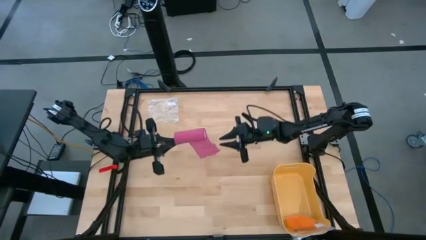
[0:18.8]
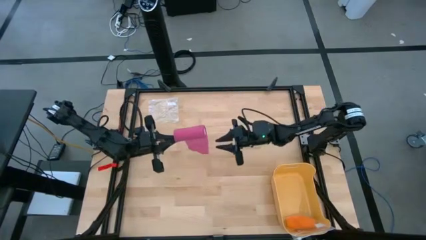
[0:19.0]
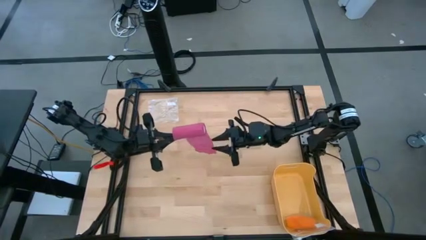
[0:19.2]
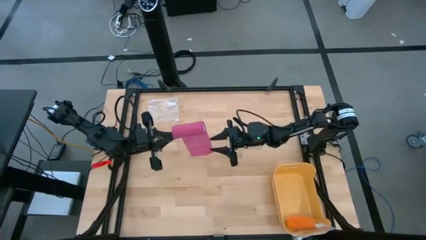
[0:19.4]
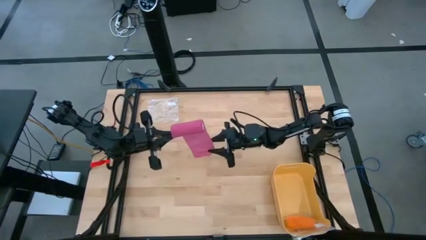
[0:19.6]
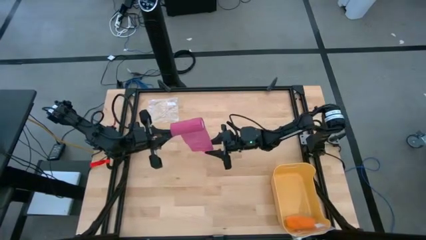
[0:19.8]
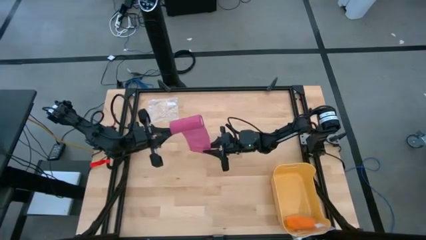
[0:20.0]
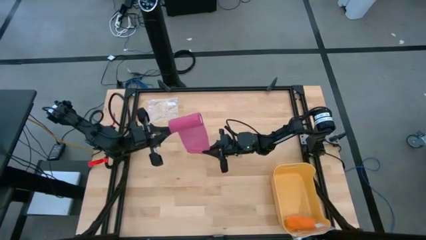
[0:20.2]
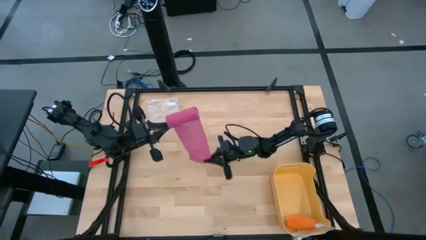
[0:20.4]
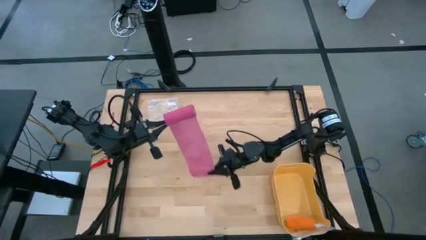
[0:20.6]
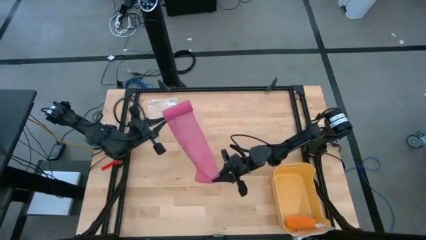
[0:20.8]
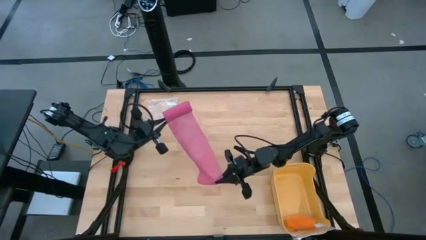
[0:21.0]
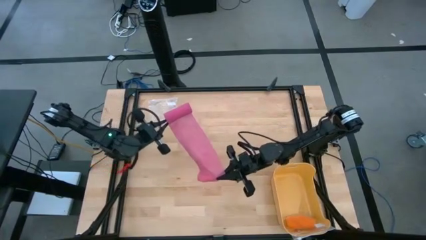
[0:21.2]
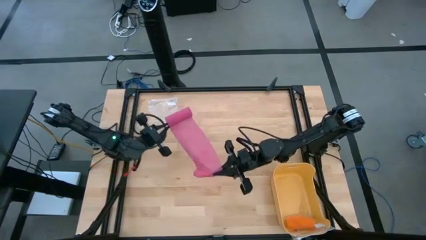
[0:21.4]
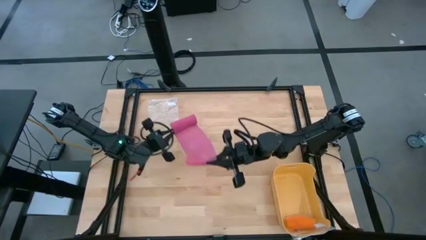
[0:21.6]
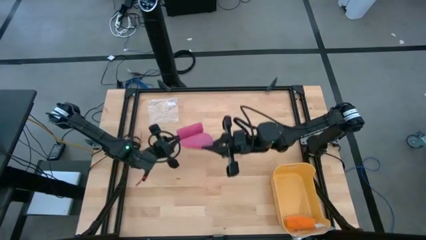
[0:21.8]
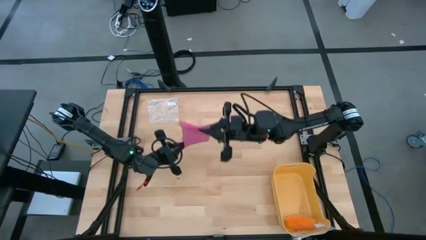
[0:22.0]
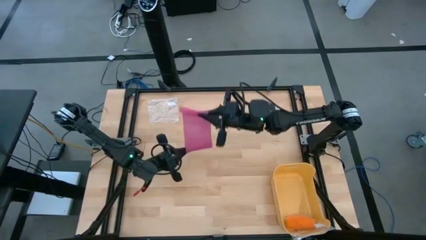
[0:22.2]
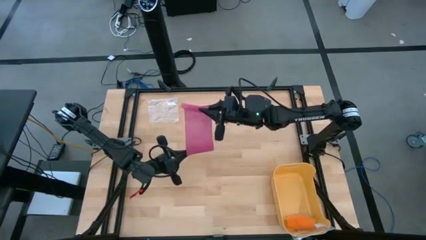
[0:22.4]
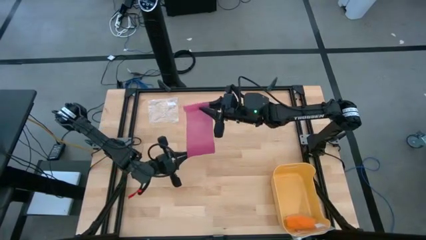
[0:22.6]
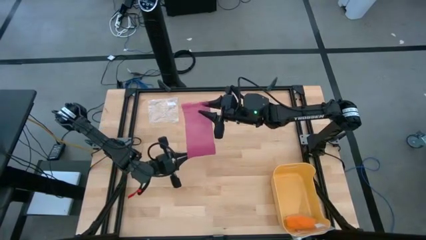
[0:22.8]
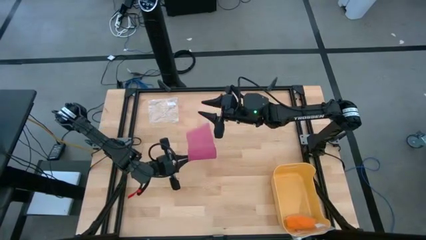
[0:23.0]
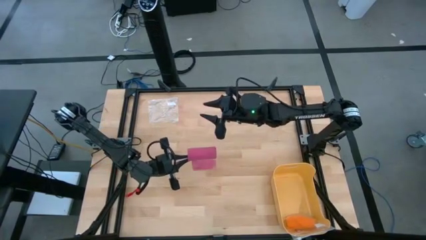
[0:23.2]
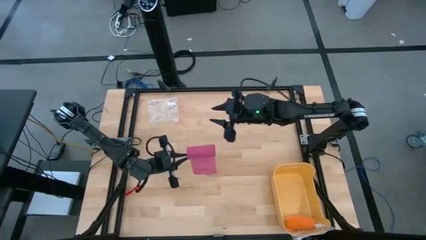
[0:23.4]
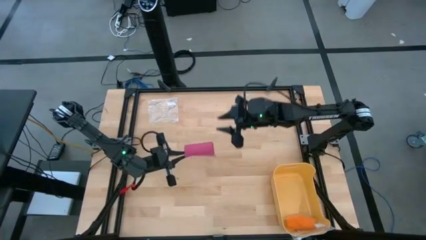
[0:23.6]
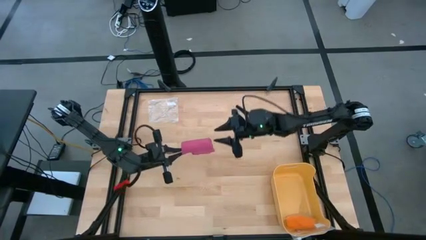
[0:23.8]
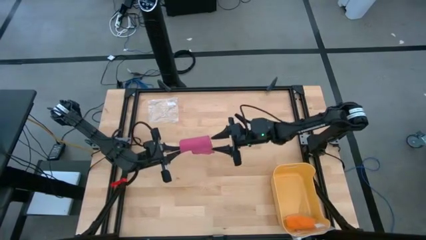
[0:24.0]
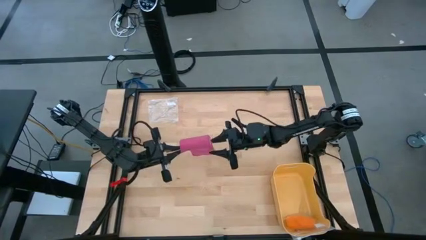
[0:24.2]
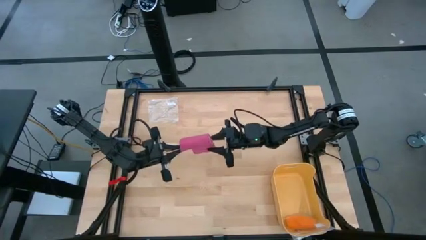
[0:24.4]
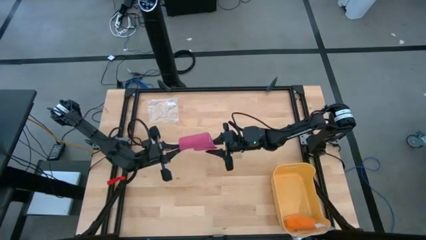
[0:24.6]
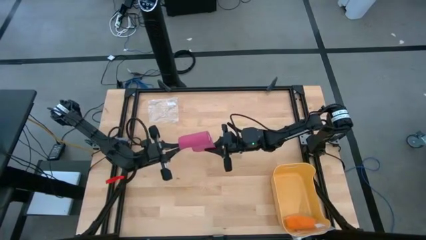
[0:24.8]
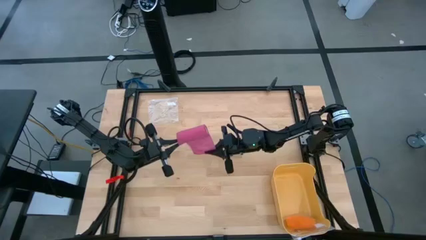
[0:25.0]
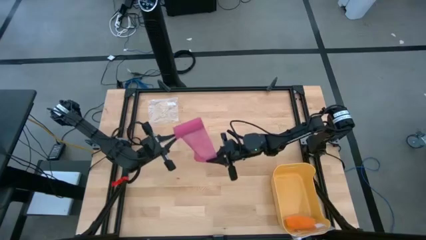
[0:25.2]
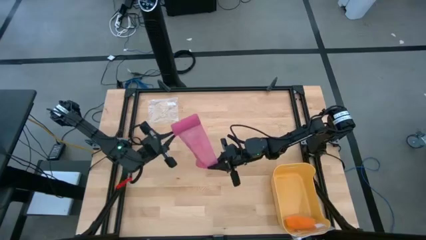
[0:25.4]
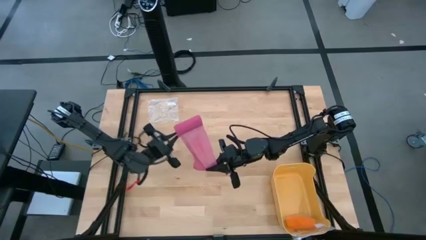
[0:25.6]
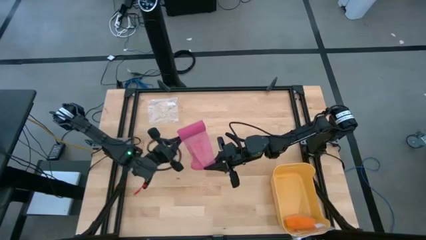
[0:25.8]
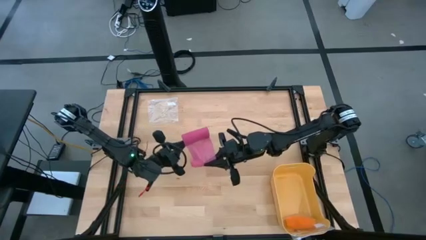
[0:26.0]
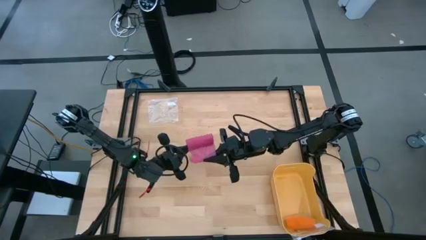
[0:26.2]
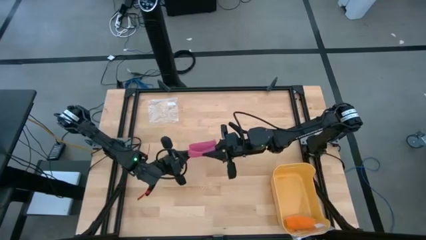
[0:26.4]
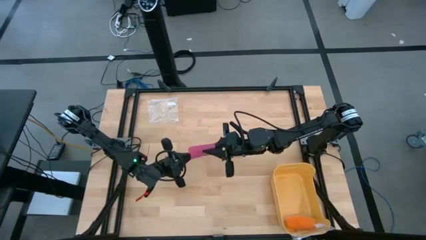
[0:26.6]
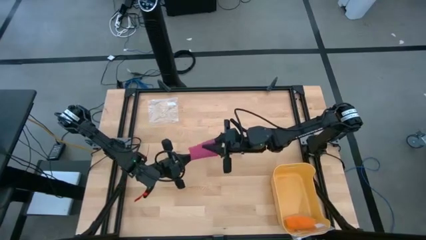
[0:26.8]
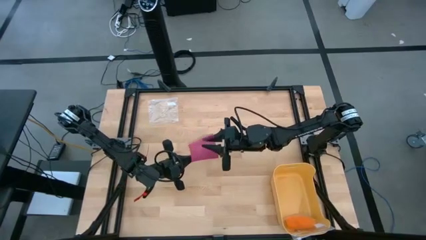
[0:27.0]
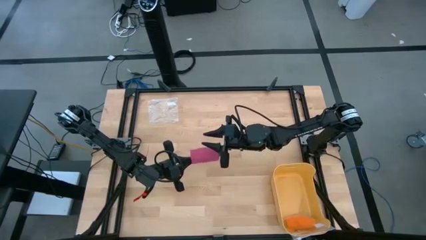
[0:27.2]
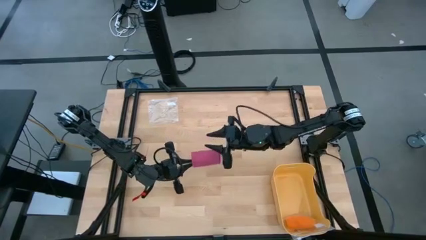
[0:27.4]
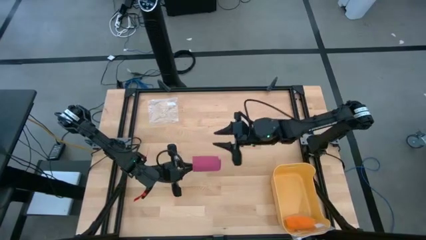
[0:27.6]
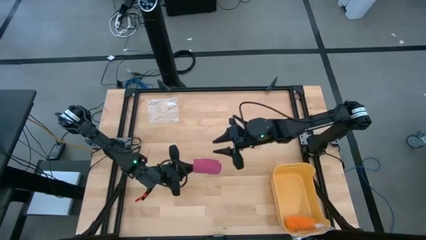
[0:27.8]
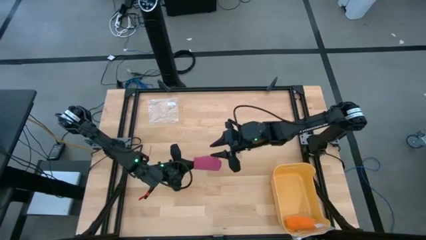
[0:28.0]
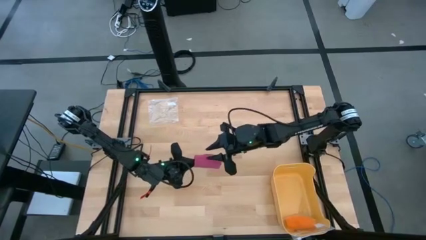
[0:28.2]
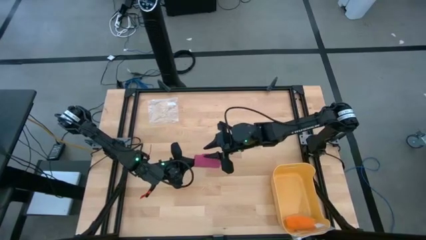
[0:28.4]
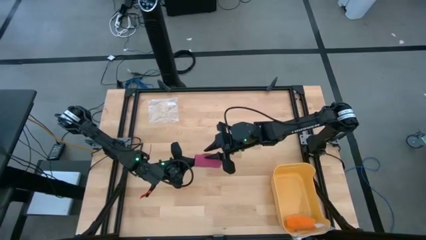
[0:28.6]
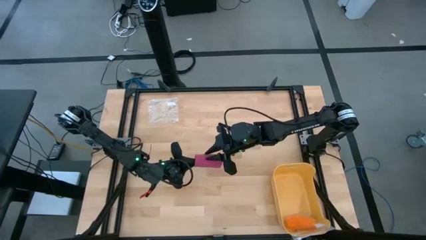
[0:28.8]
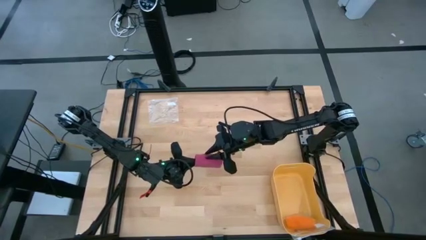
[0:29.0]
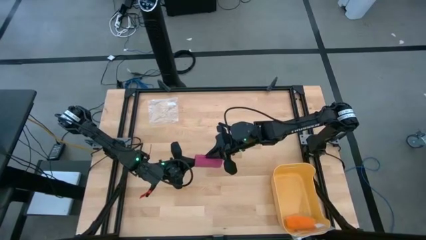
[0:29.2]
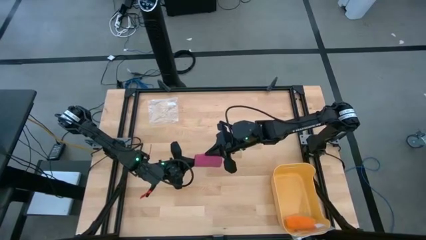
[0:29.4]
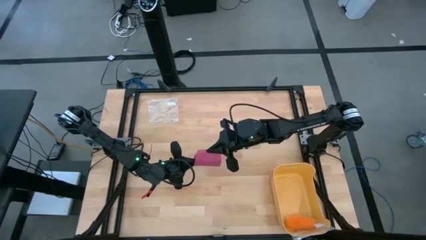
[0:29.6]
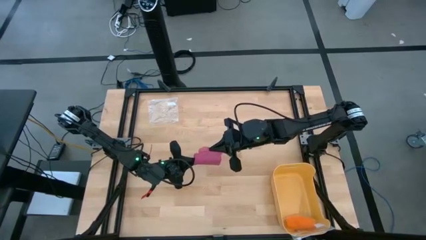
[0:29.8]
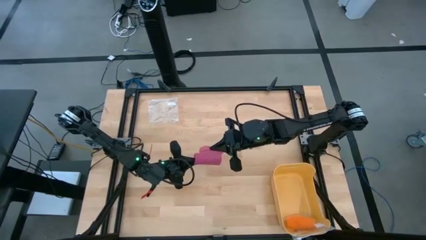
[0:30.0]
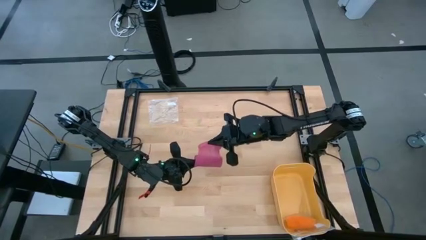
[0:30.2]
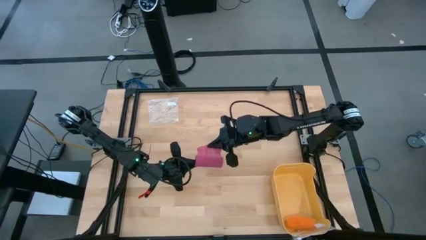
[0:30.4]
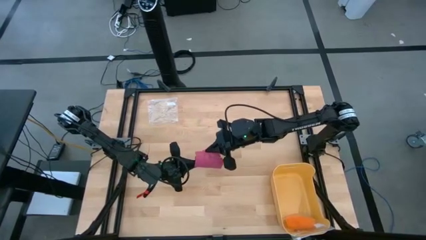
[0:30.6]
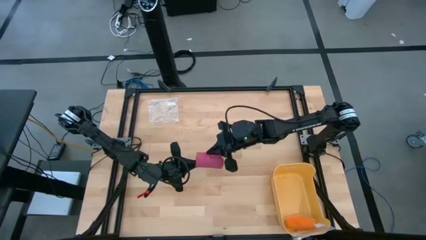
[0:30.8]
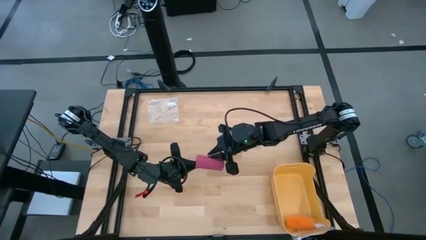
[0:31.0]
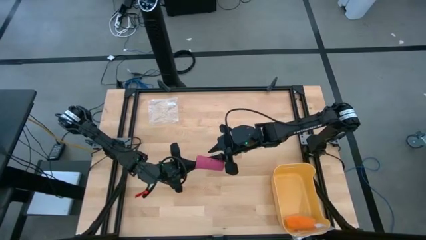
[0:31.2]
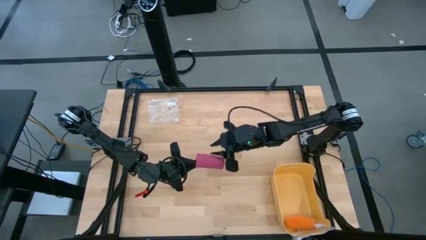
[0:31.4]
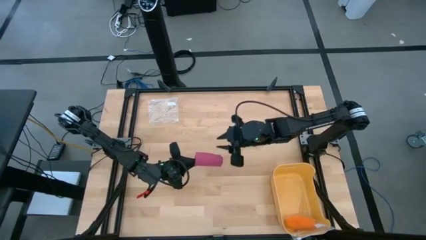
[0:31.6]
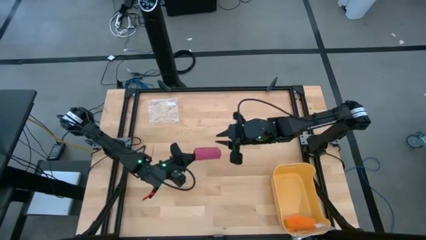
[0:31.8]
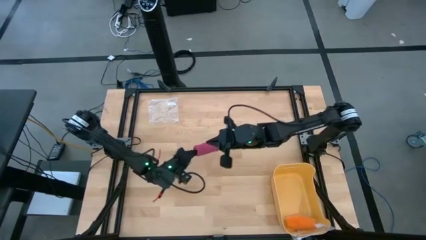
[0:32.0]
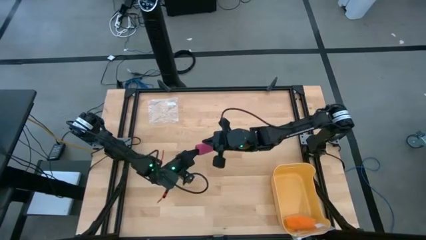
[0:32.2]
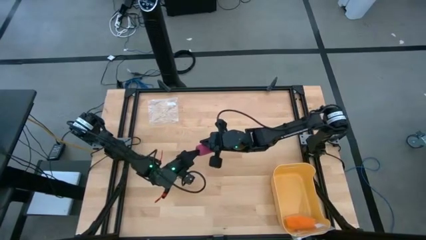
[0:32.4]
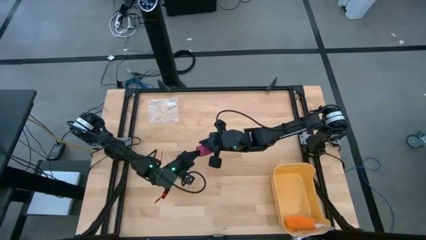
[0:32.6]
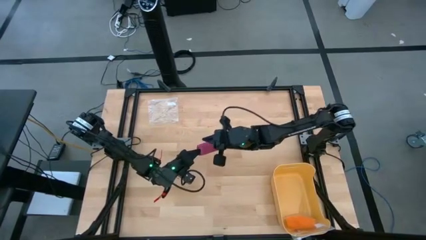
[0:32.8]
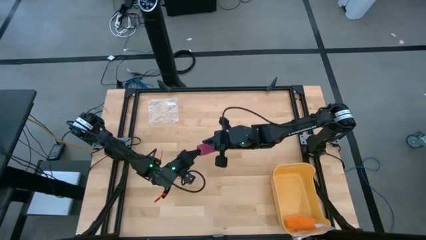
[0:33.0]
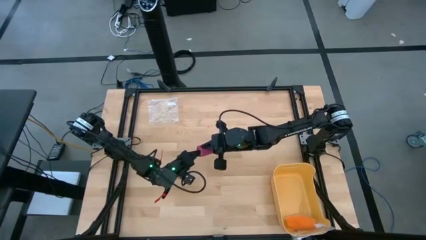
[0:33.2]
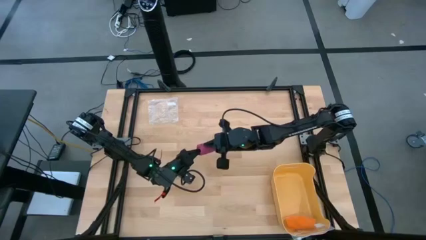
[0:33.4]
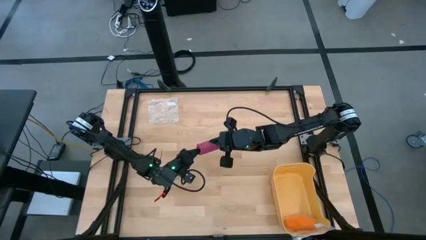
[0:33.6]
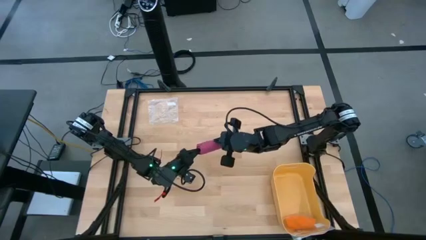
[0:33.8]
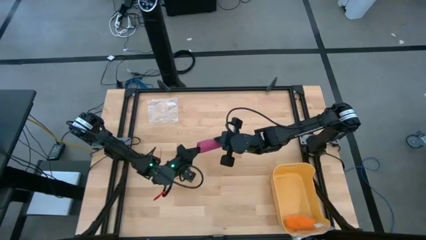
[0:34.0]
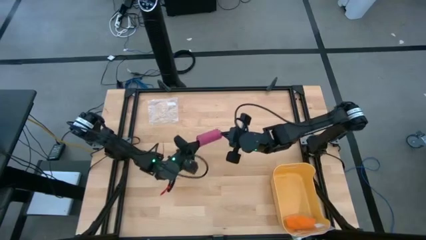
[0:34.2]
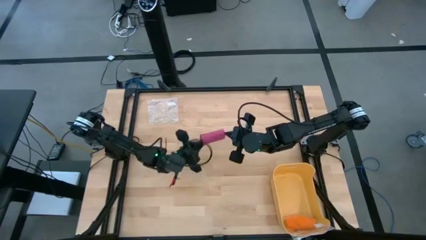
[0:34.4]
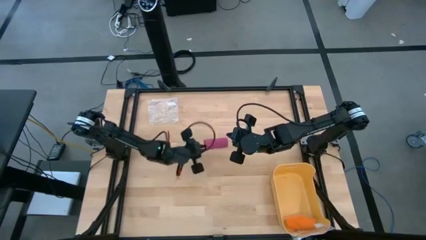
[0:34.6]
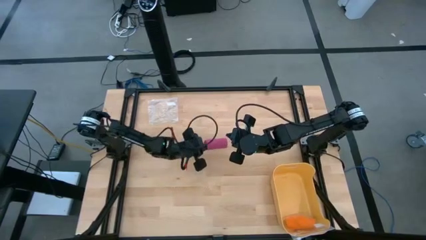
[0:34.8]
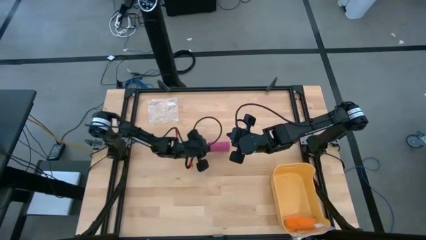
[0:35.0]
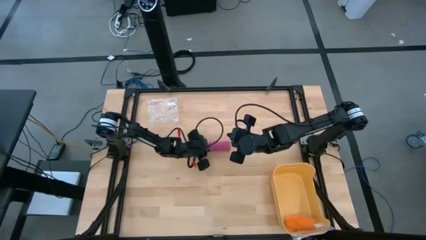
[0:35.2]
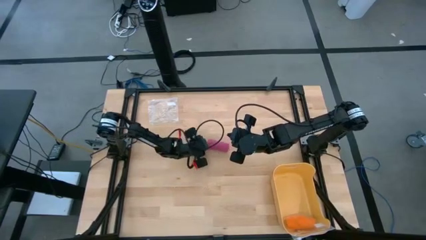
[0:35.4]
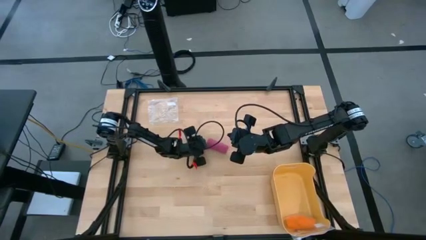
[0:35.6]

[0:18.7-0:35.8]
Task: Roll bandage
Roll the pink bandage
